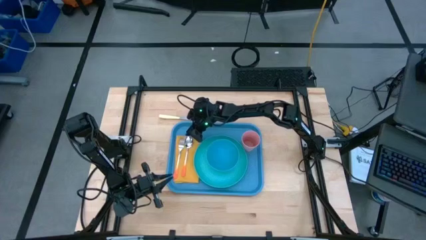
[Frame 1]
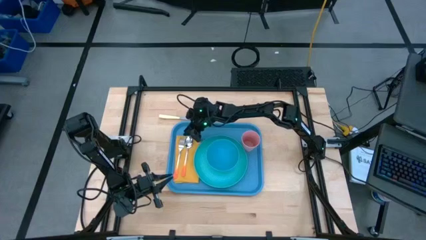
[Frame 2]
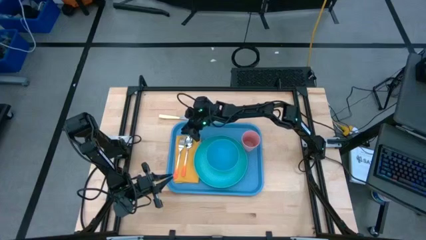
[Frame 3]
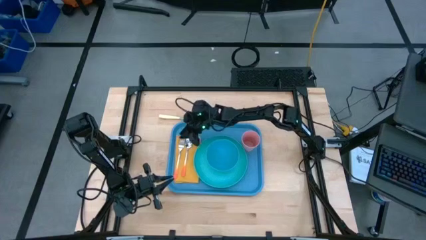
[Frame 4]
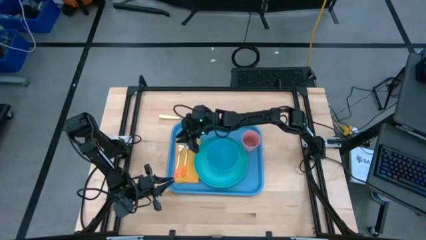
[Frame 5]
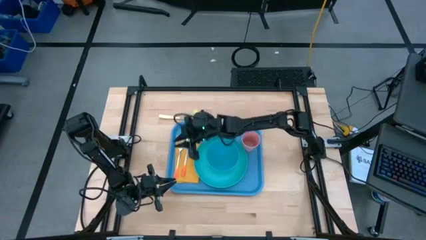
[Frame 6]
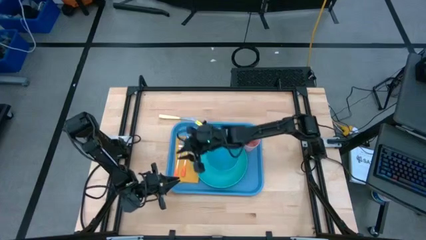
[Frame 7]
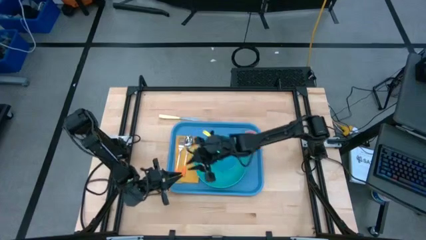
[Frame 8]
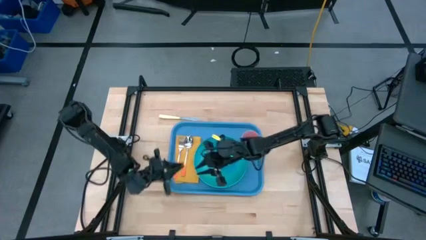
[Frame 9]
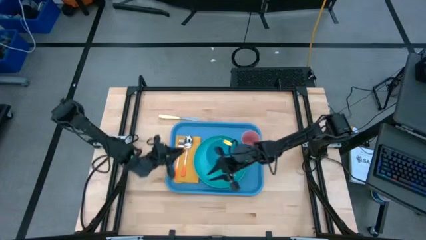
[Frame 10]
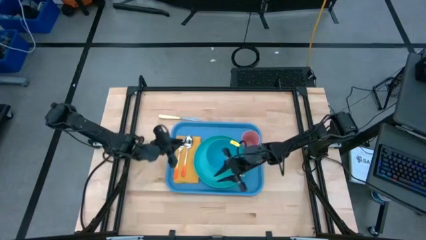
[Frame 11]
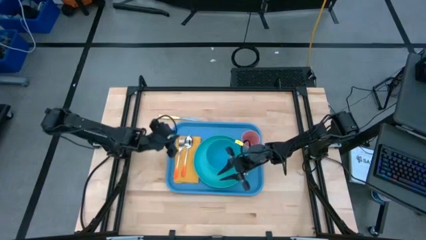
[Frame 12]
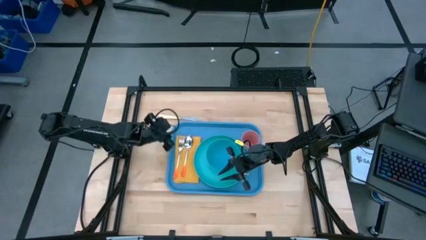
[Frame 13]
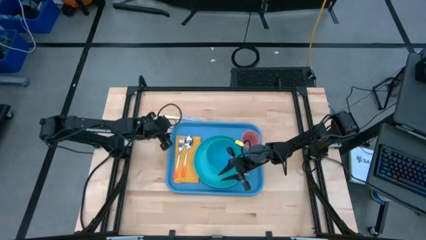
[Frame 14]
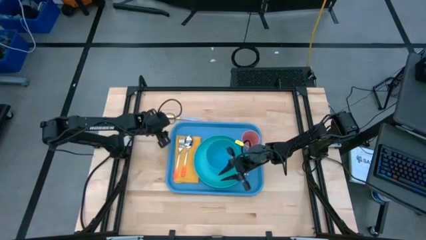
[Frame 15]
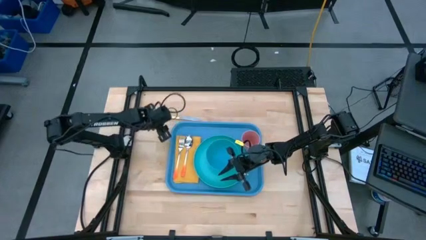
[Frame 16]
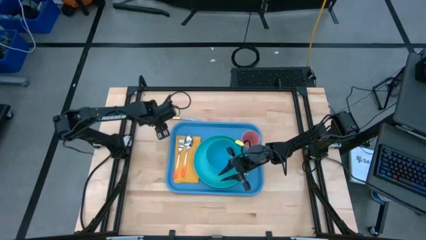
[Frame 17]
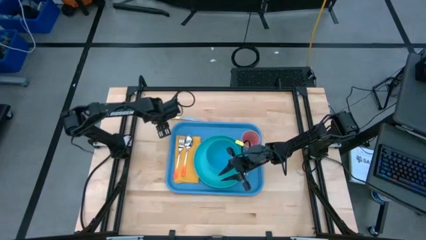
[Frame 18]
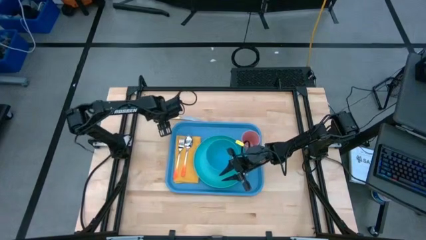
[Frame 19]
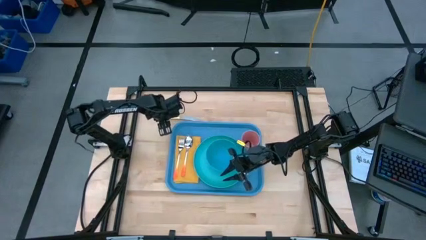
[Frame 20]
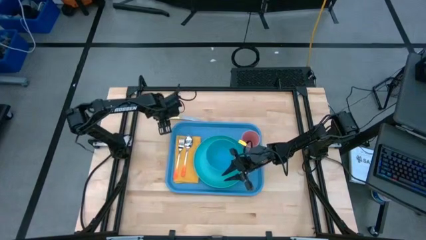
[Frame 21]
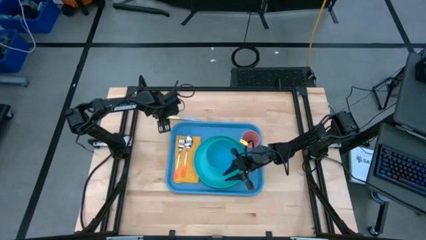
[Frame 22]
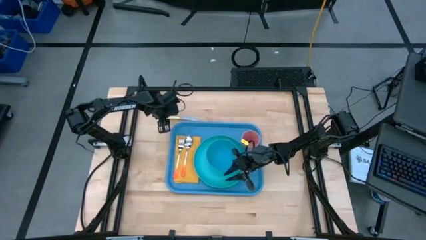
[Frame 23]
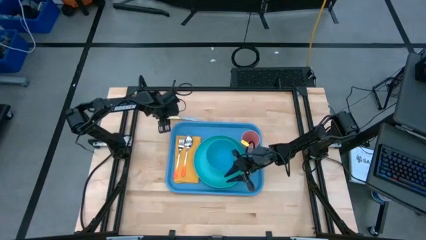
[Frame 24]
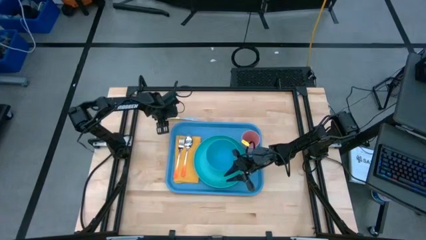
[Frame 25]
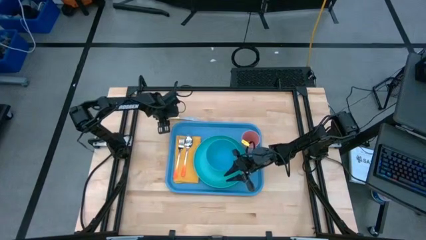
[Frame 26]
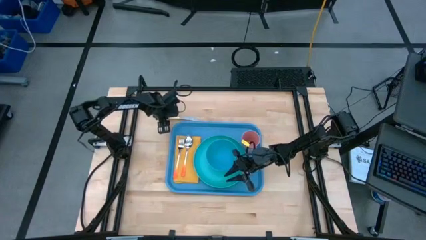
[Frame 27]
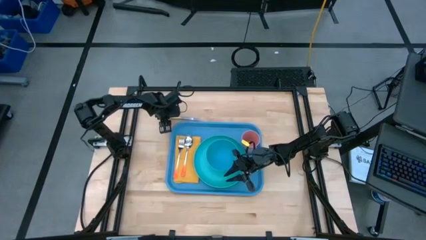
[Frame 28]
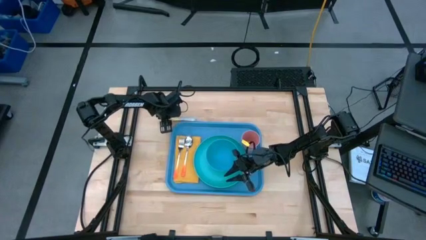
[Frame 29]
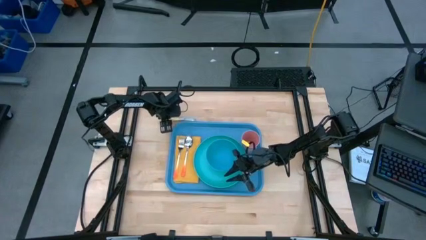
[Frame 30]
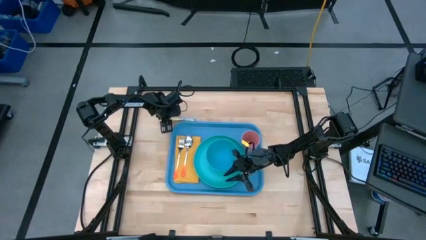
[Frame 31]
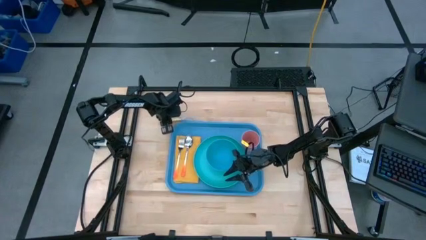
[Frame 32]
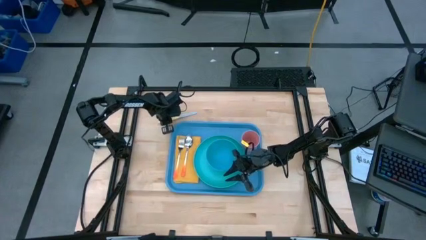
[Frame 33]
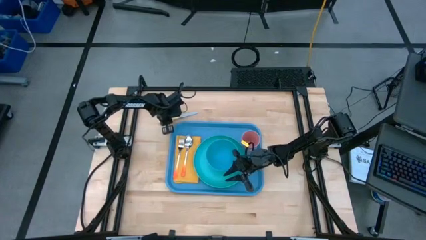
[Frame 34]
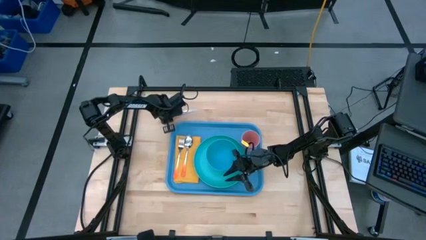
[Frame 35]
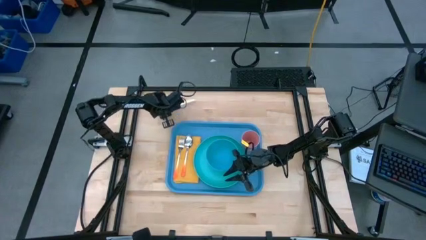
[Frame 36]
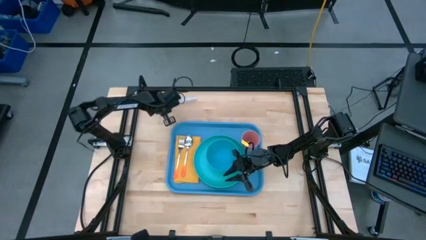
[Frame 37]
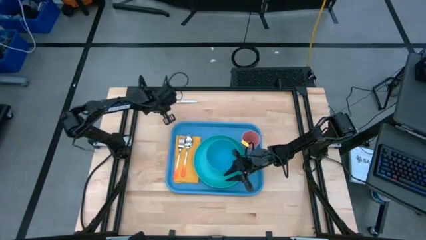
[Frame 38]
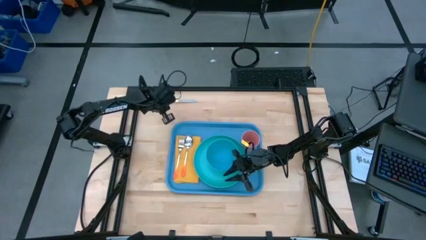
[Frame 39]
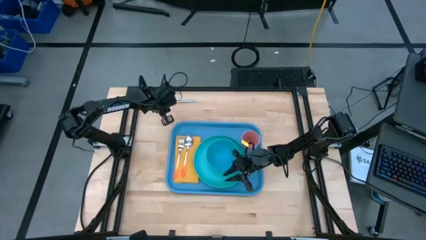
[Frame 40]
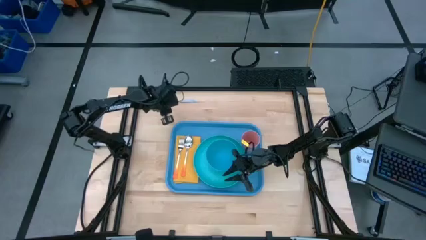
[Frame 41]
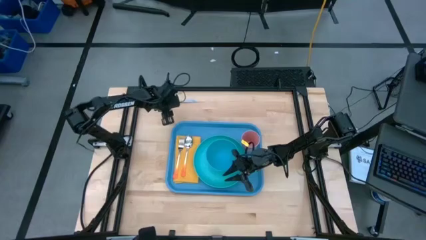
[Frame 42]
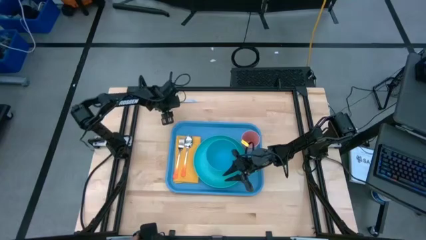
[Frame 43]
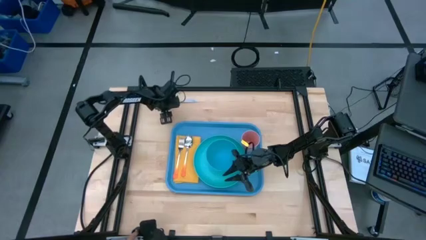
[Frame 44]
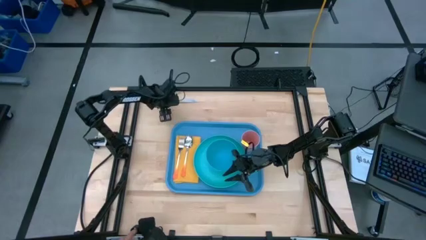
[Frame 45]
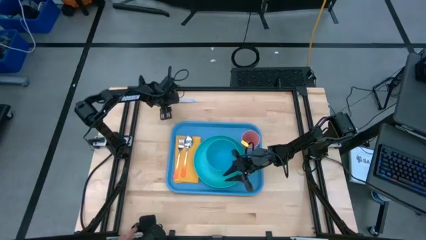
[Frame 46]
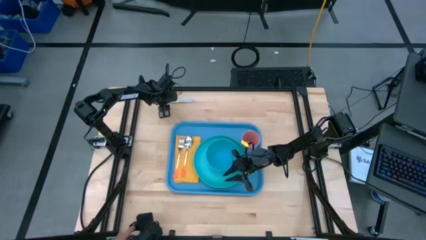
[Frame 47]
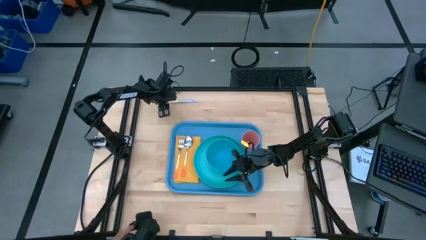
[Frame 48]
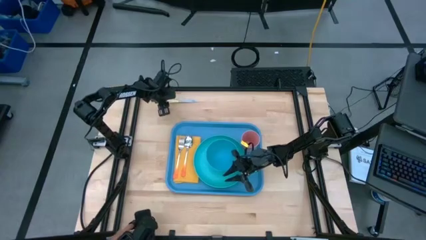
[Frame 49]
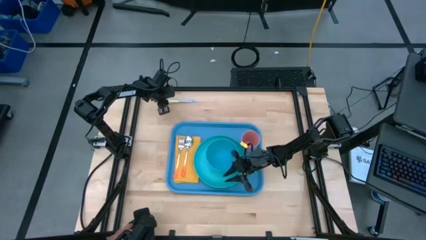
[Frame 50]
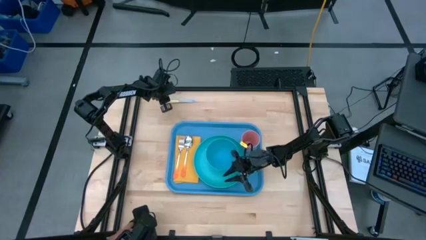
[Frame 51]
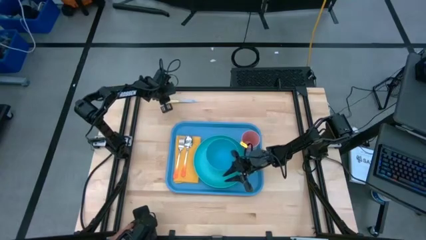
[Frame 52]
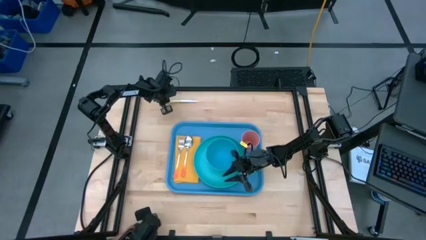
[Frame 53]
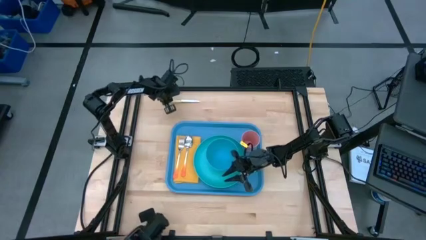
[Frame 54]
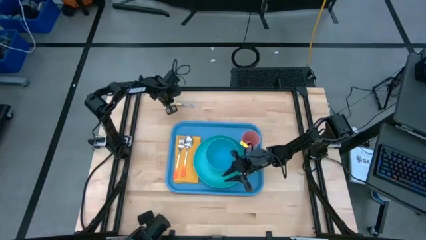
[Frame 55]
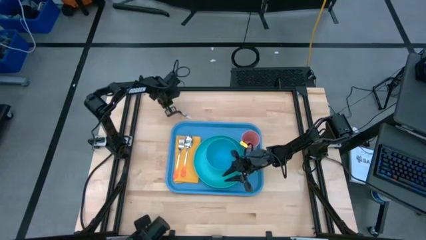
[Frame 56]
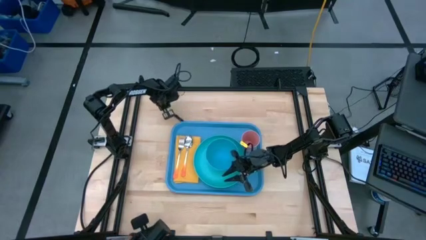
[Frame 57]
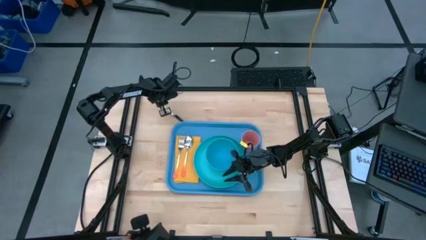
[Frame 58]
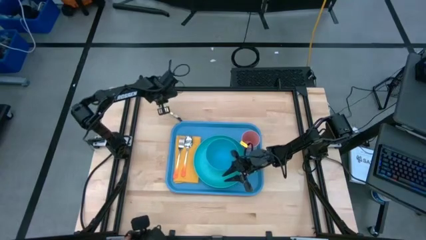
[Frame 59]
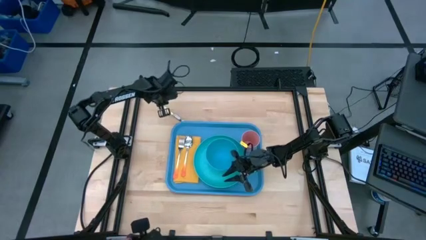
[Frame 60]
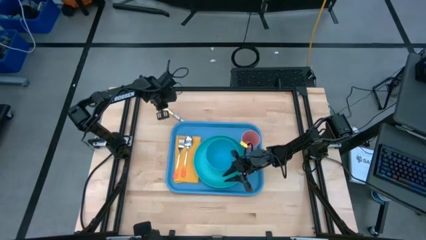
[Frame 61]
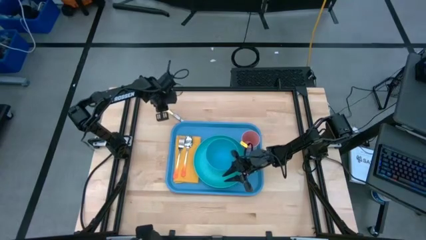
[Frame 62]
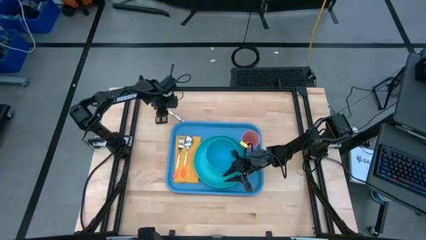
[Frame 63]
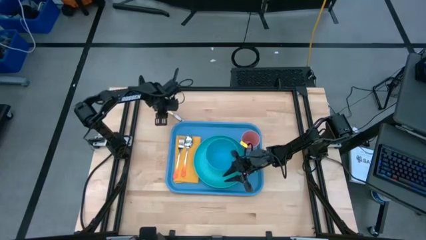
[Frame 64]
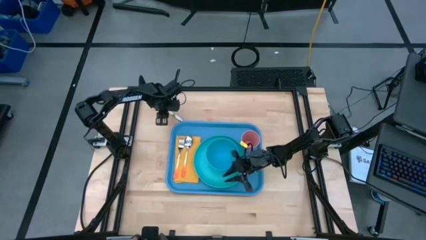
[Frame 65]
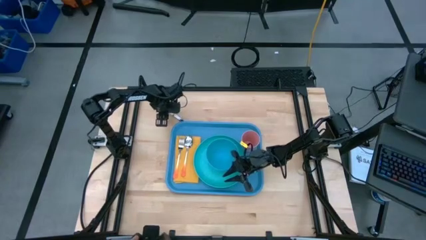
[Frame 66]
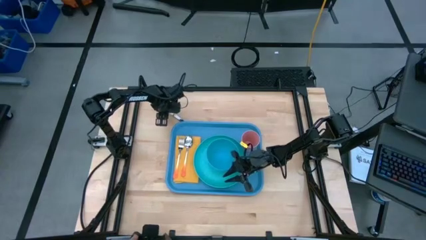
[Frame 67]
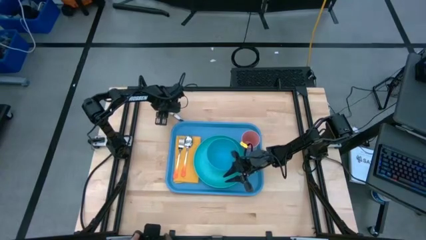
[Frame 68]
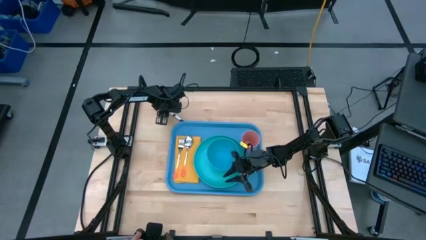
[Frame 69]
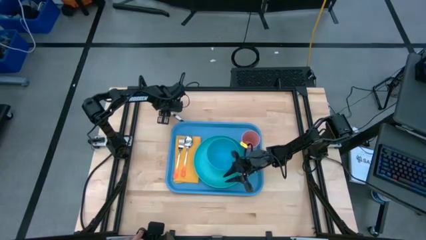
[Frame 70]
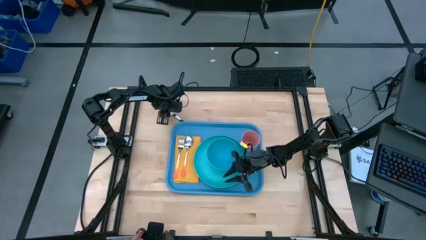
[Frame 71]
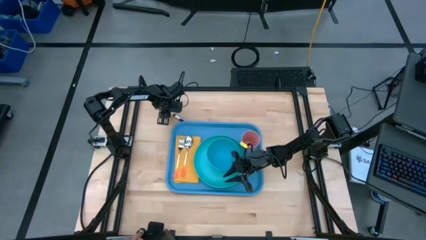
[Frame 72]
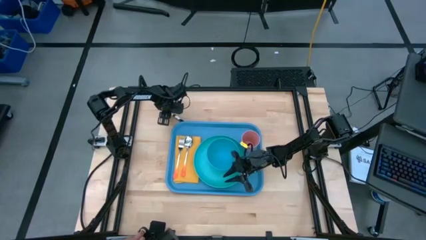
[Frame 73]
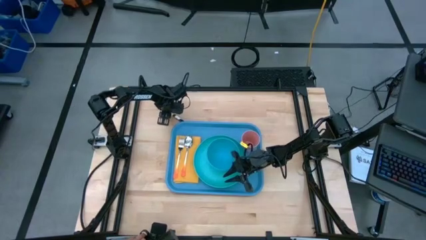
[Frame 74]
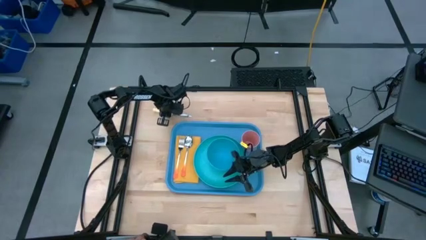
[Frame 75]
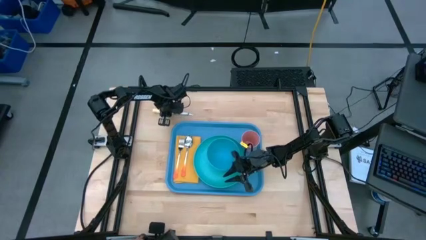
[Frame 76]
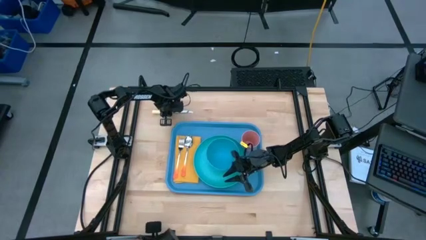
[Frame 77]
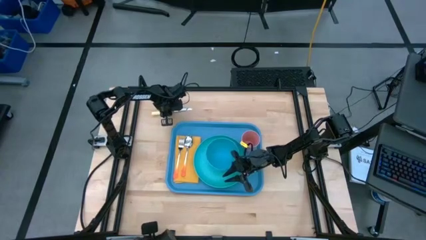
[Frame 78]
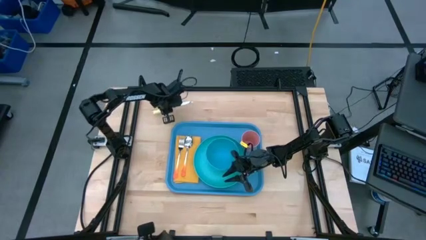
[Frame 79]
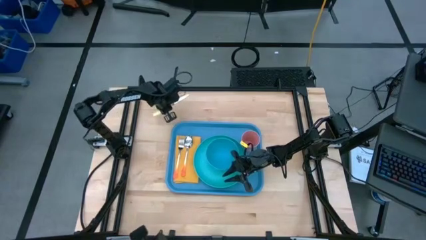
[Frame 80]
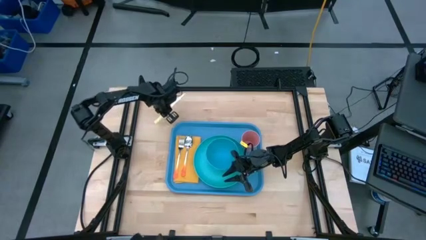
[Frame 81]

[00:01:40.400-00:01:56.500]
Task: Set up tray
Put the knife on the yellow napkin

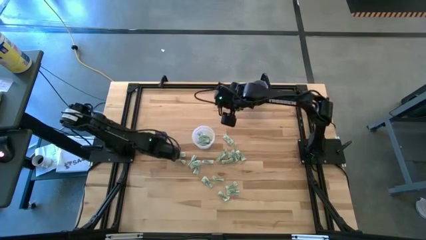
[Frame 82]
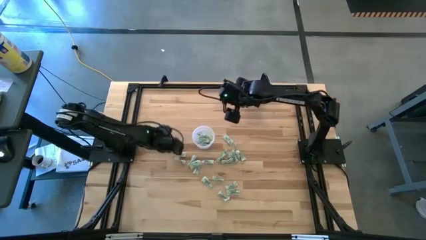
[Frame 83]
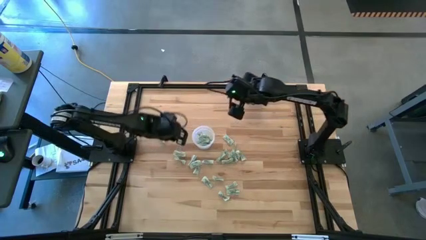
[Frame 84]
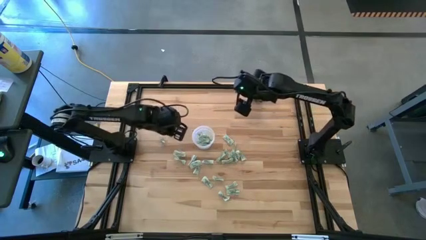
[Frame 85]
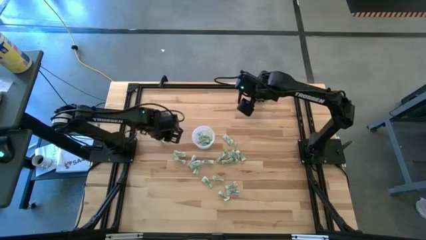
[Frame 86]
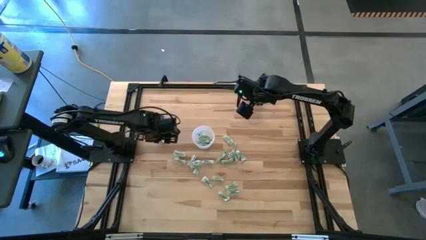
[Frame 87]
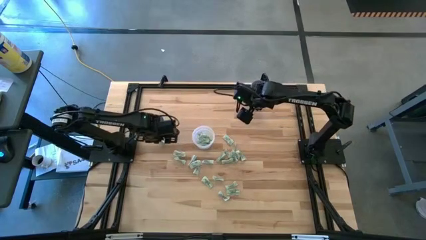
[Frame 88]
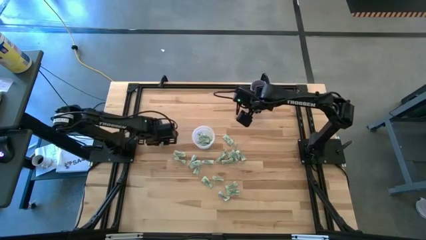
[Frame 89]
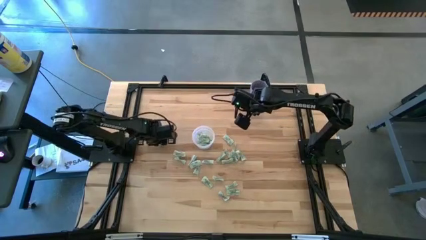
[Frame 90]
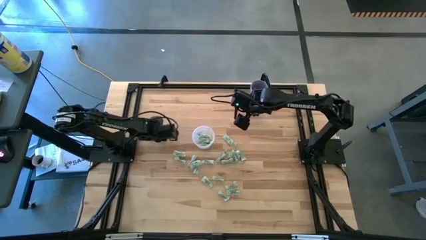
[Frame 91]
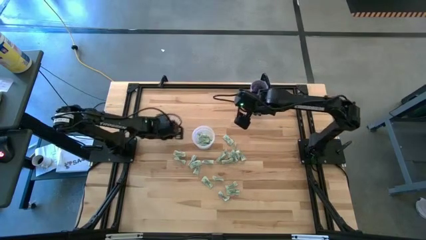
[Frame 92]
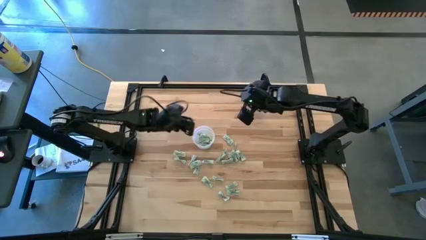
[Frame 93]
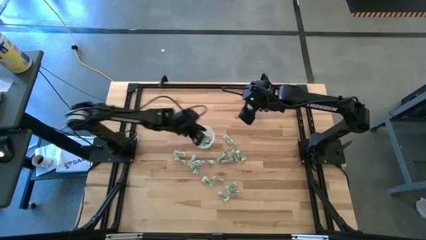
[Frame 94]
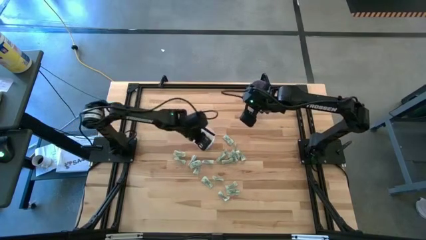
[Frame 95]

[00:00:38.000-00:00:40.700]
Task: Pick and place Stevia / Truvia into bins
Put the white stevia packet into the transparent container
